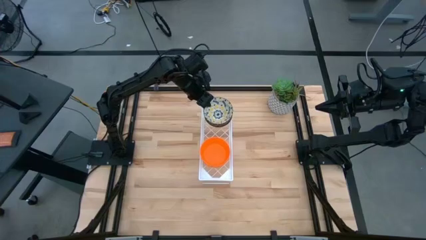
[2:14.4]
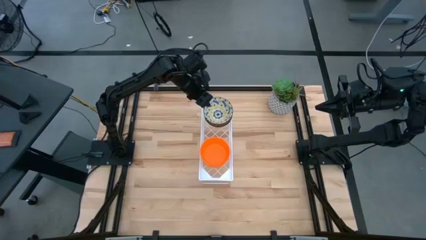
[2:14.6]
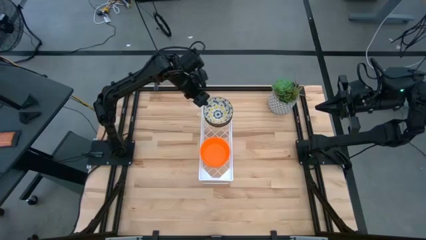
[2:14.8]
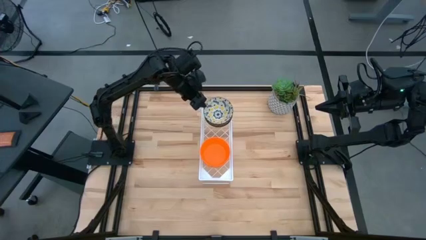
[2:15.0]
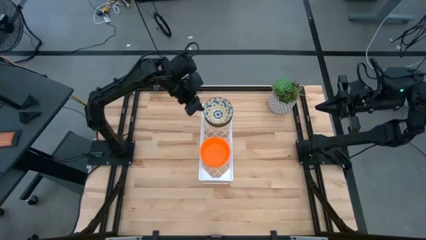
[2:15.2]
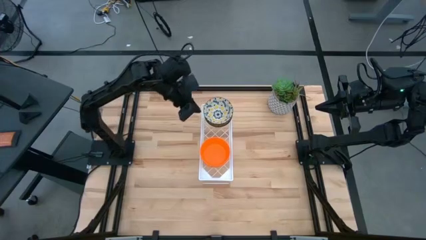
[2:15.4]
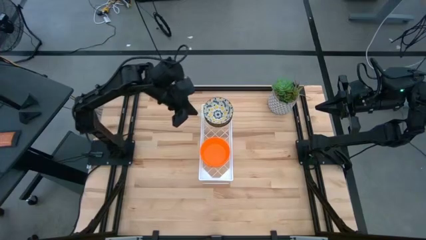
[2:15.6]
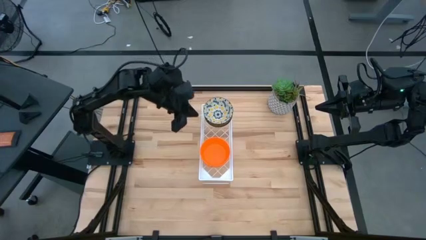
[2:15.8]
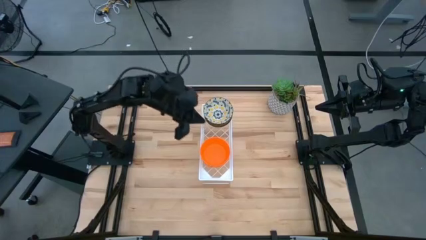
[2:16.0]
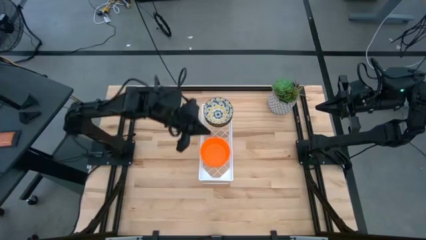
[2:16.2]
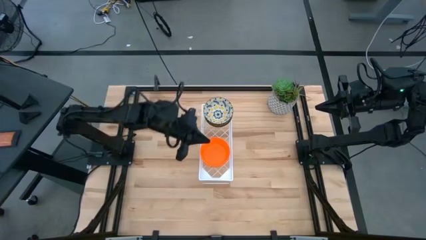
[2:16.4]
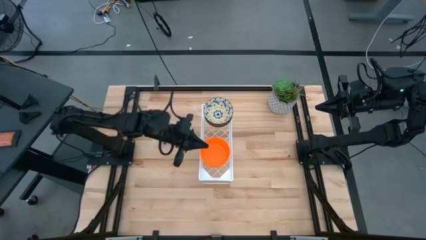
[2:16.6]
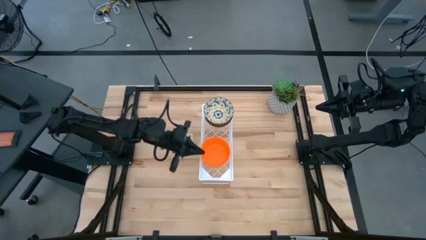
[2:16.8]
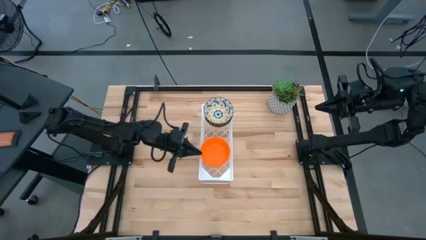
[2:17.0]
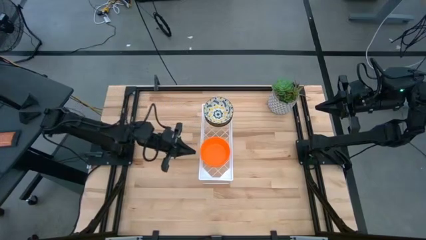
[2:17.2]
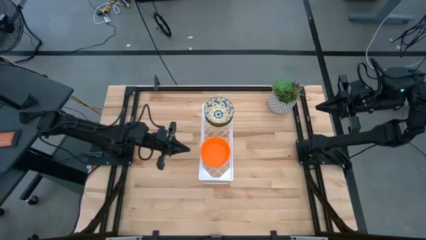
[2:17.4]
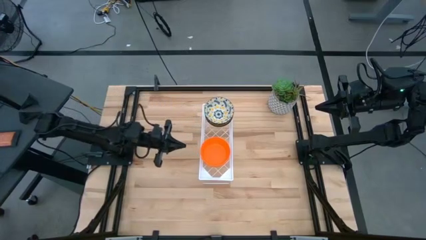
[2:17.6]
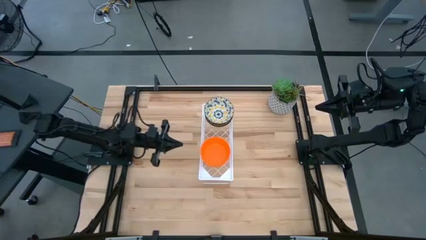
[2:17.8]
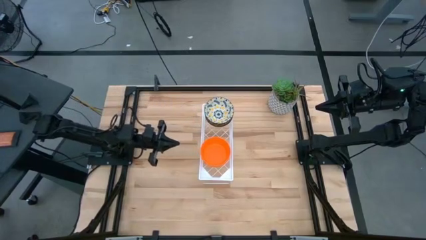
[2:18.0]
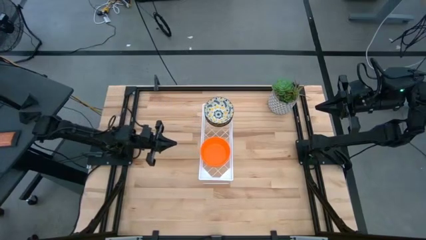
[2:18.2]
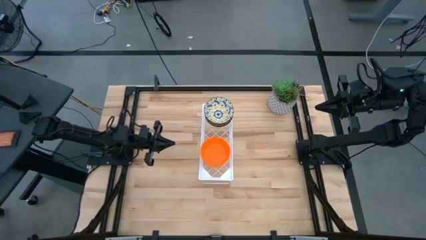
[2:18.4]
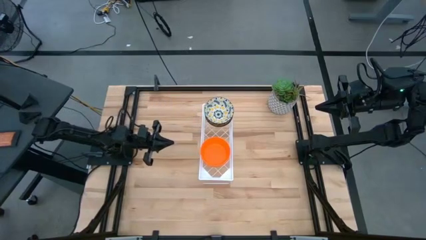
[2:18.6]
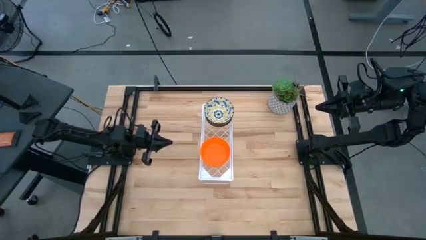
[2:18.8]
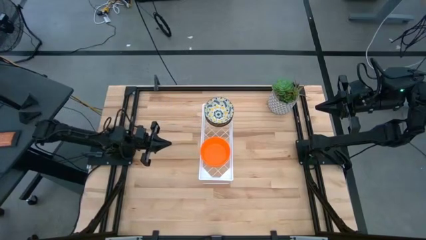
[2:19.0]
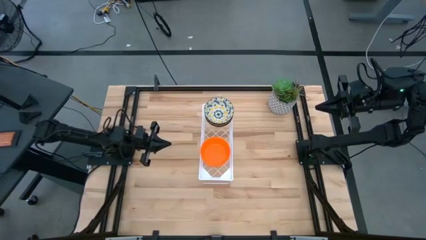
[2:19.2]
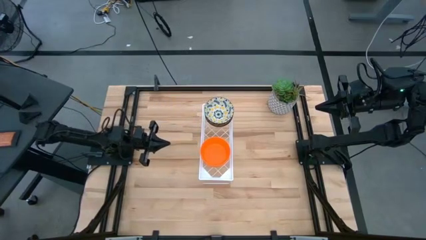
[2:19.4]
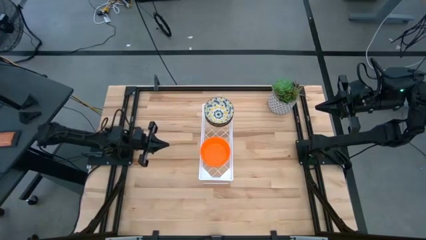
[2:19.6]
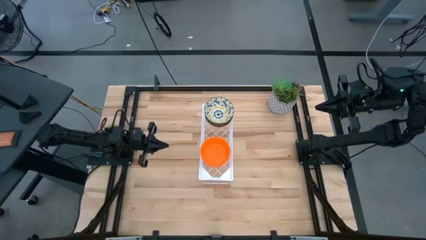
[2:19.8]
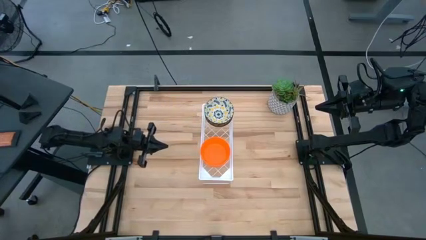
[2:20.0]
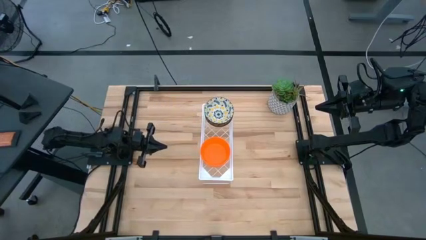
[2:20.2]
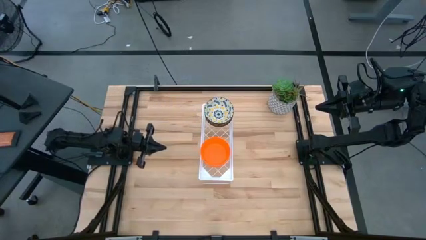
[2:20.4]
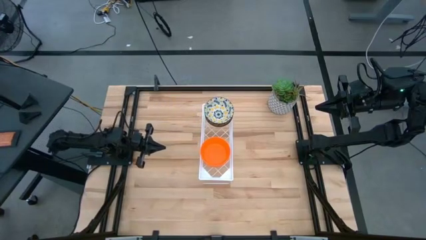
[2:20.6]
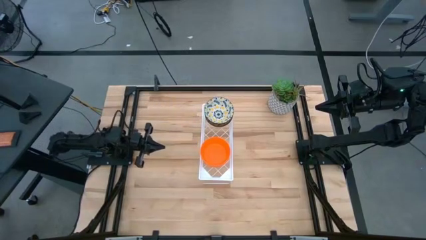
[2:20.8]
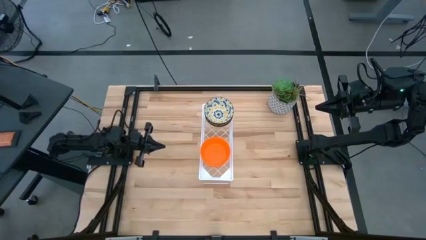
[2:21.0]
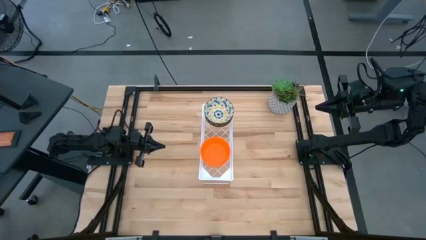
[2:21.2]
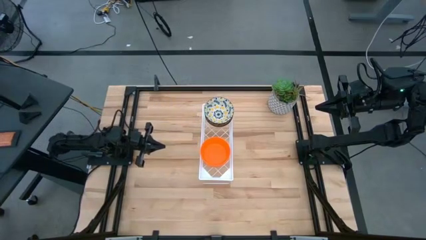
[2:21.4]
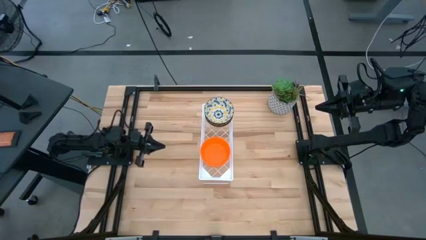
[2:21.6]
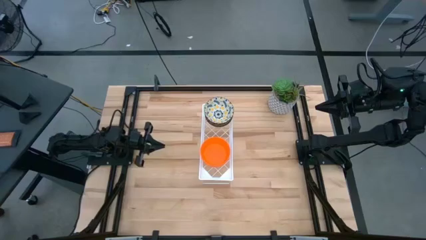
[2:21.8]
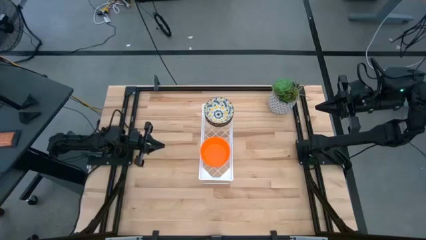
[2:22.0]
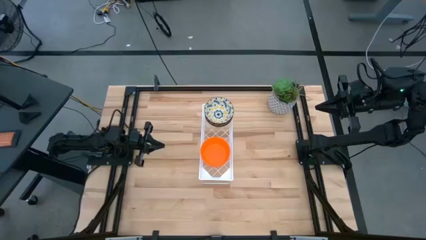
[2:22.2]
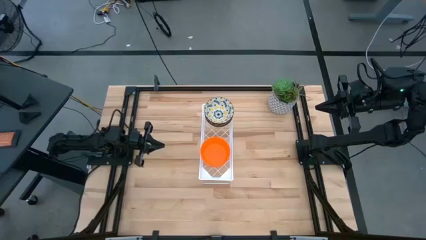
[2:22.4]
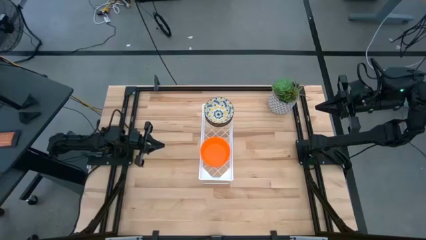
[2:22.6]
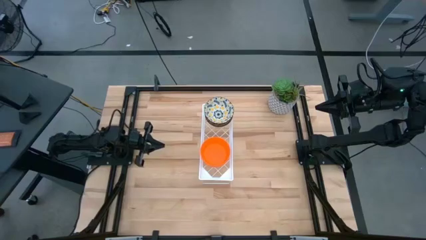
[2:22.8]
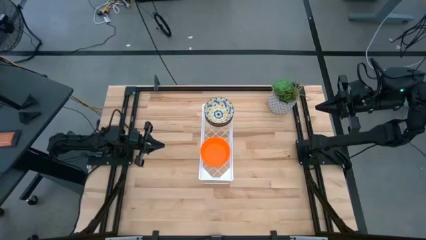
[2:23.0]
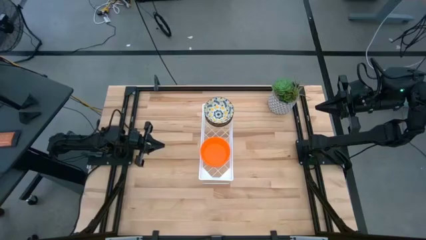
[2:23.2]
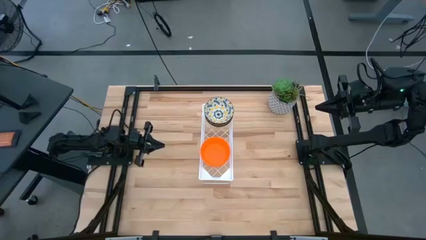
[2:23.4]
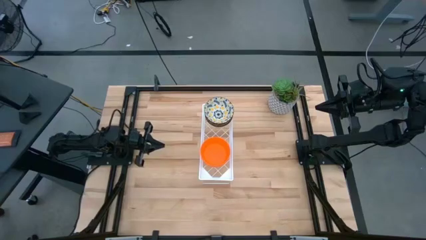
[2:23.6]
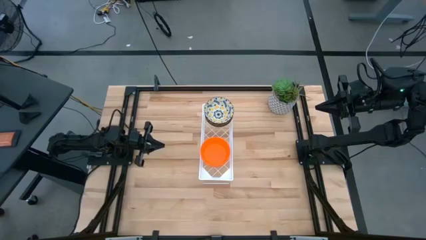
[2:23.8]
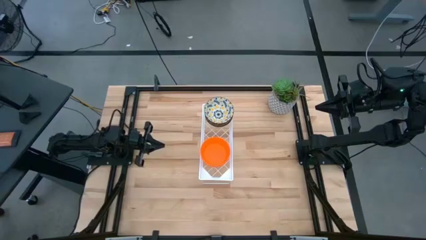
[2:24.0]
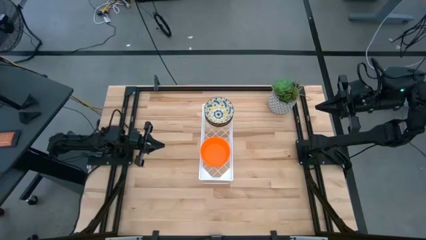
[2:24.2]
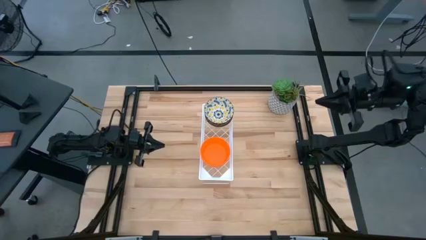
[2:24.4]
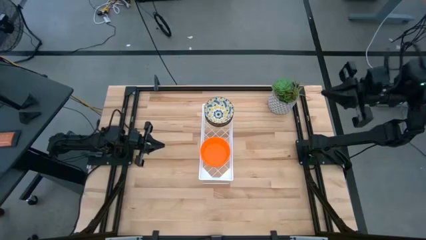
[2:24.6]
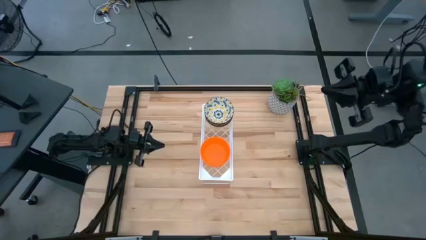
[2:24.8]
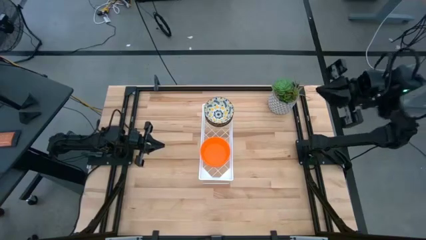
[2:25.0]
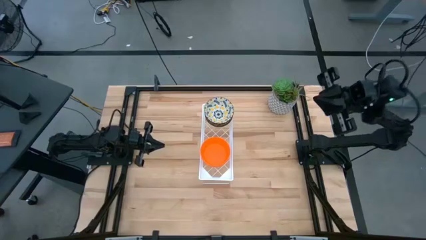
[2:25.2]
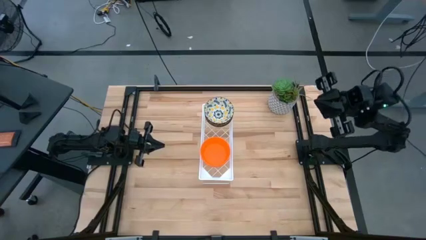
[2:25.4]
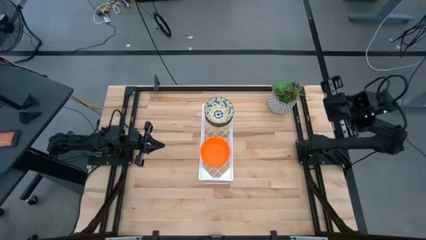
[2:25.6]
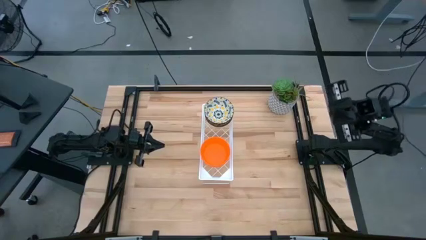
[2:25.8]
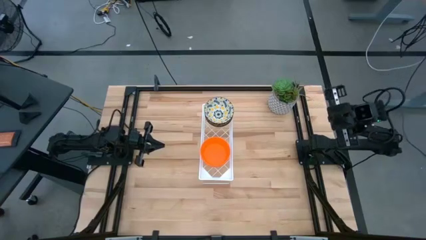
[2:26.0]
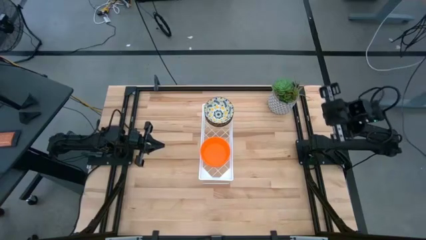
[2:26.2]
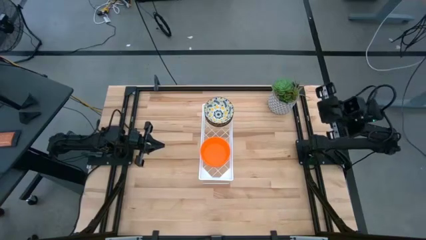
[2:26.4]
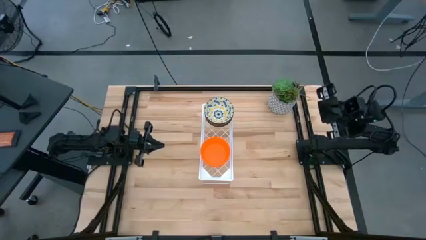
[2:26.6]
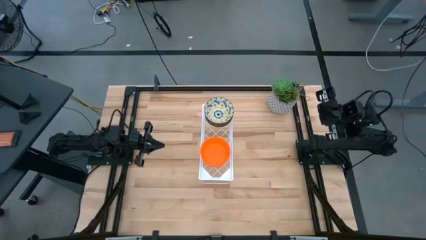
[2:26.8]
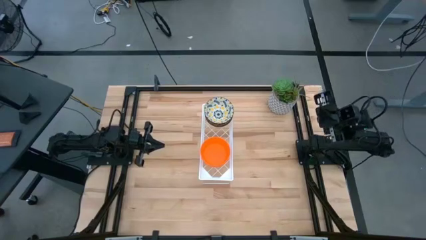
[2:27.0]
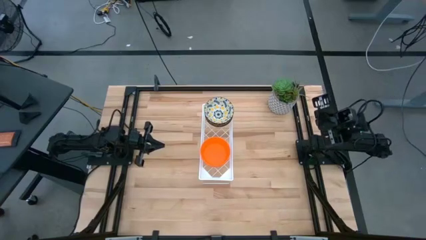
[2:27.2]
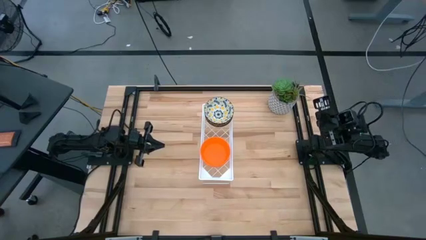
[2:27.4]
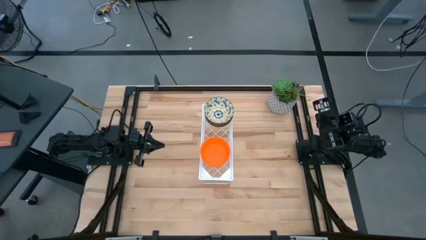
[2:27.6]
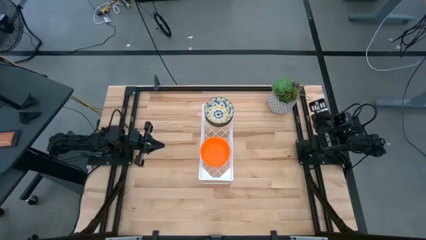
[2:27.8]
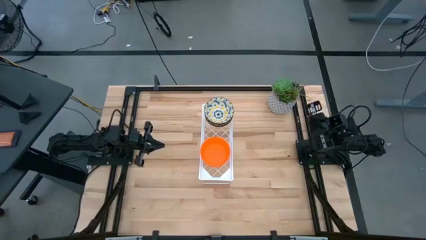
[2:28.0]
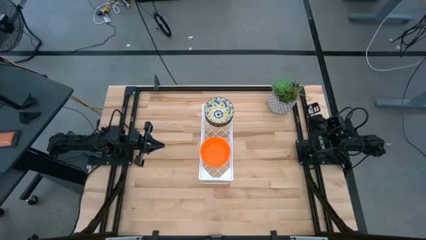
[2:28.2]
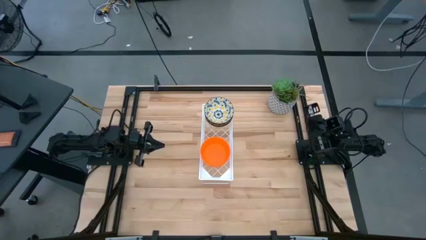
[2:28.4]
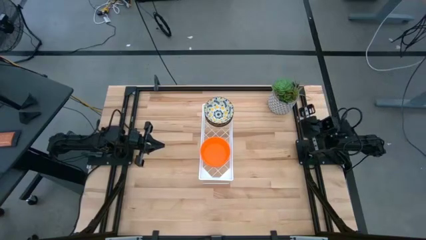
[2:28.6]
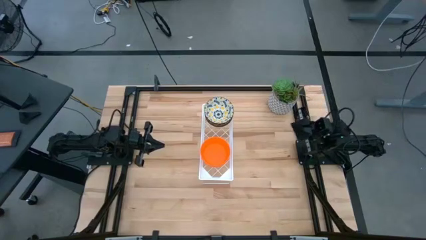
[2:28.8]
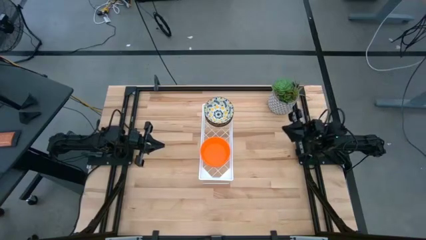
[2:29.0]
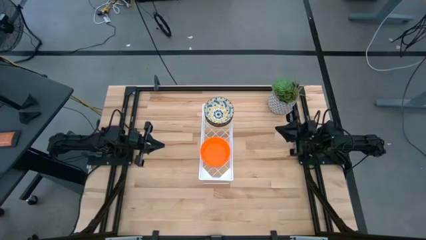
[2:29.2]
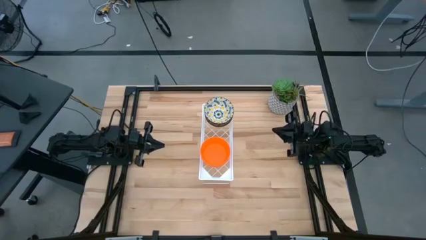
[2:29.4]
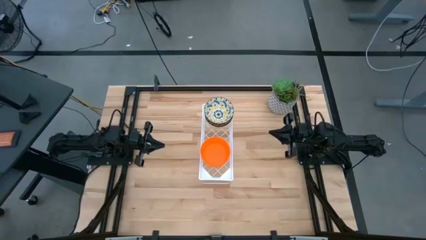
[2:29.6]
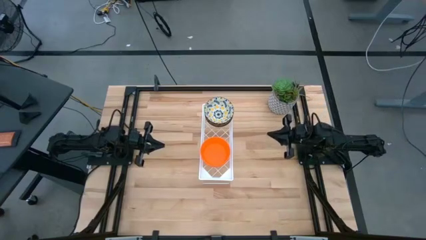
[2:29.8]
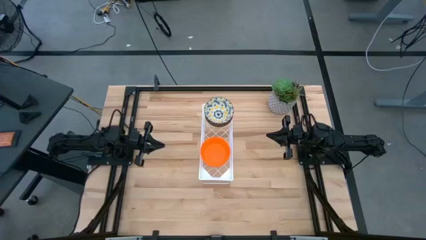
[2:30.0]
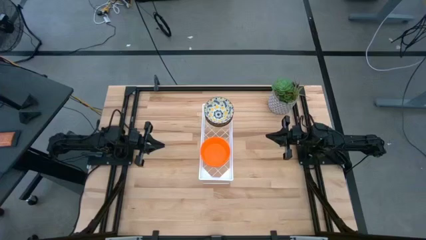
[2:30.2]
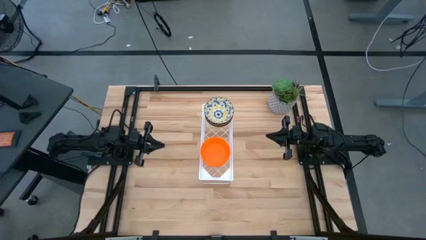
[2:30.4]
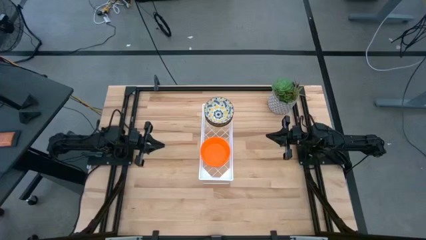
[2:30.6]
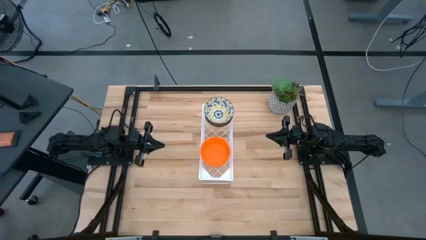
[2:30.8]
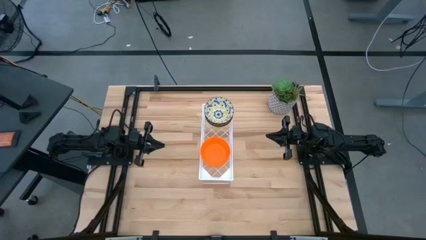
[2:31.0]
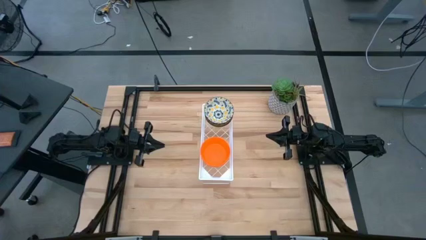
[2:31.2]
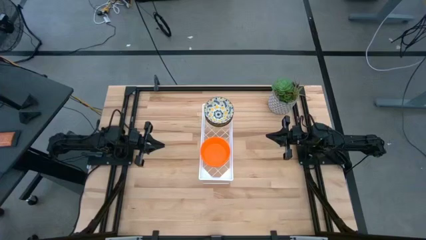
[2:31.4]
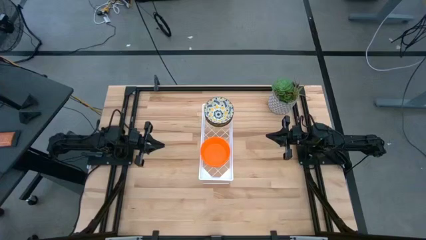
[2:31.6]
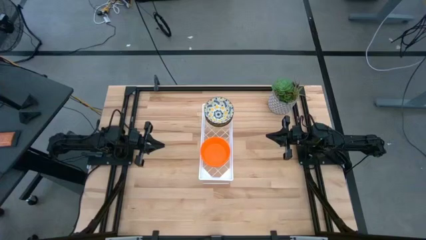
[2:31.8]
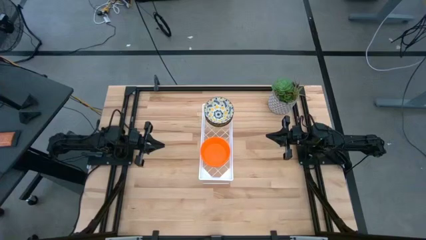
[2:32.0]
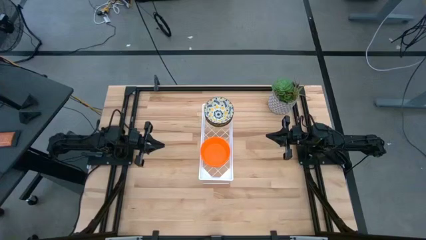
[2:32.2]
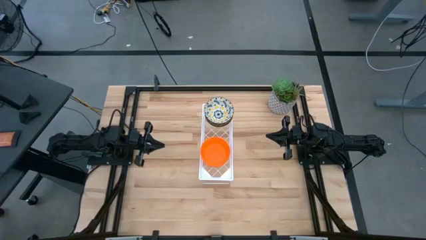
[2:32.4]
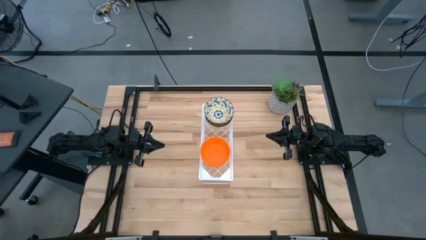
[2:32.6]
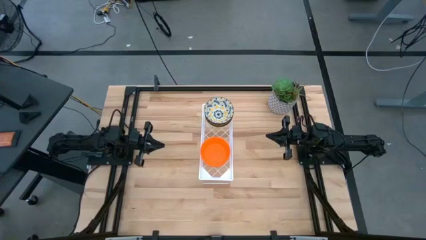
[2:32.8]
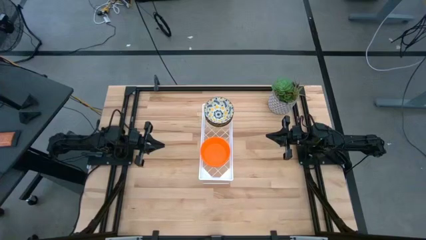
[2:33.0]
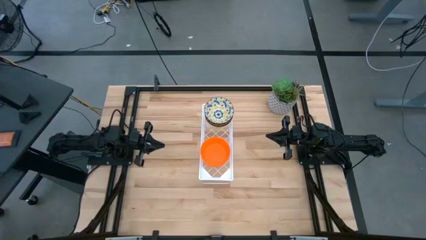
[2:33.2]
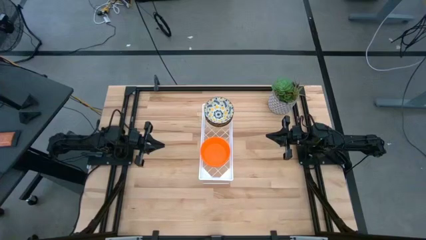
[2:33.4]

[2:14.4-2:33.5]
Task: Pick & Place Mini bowls
Return to Home Position
